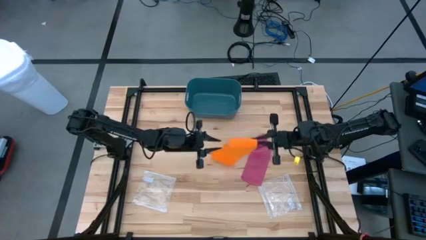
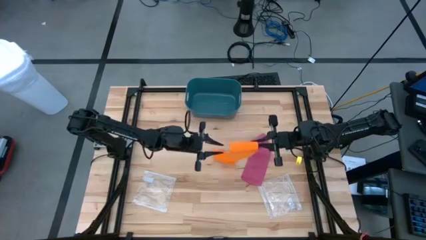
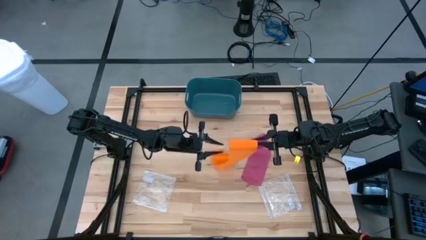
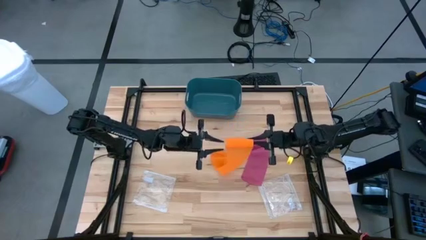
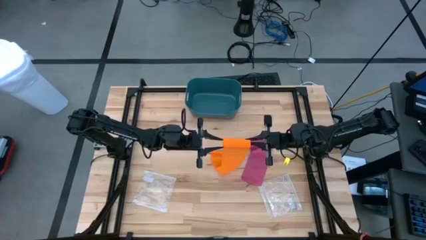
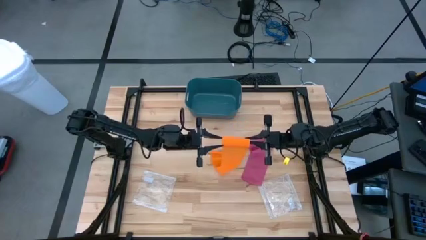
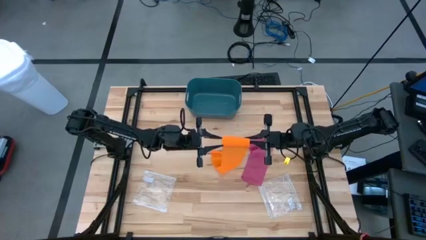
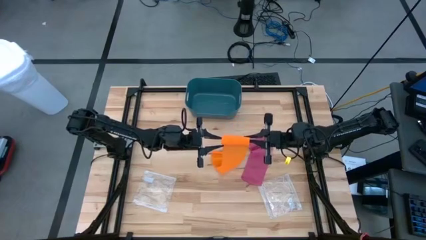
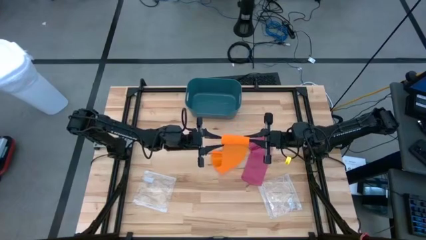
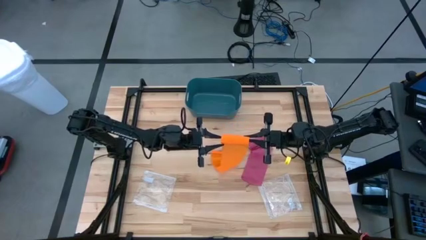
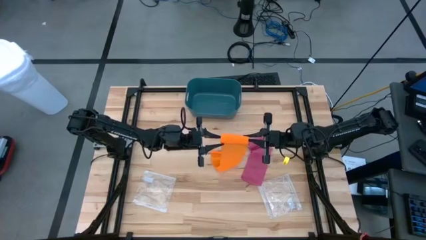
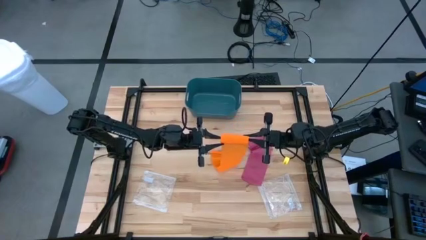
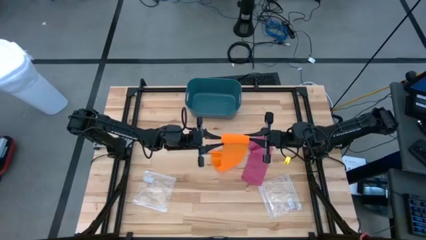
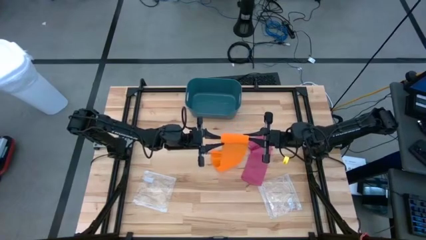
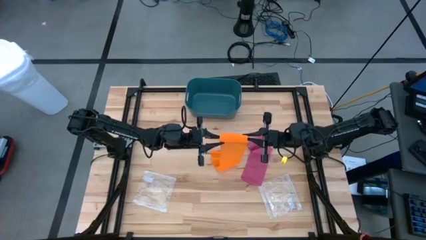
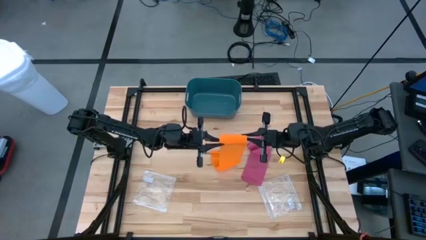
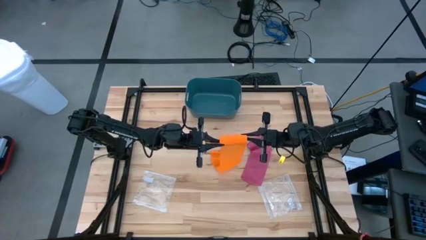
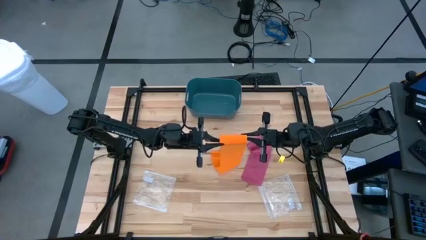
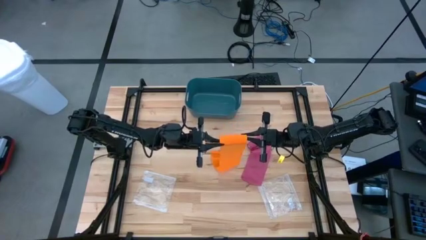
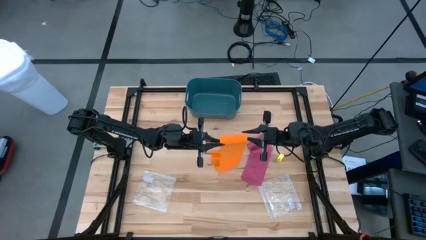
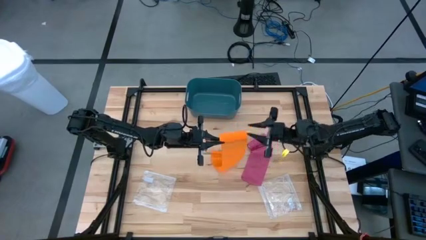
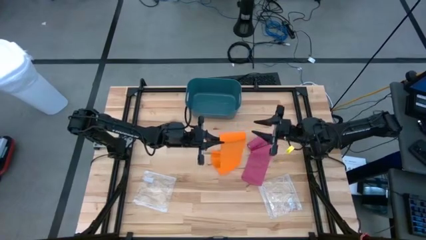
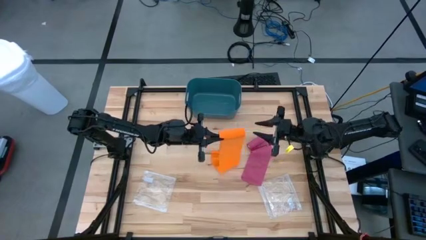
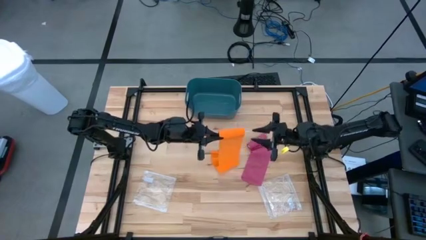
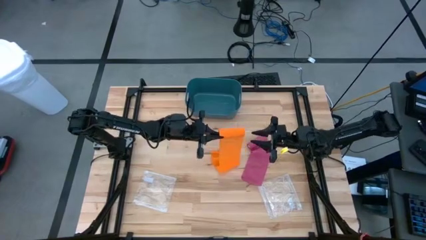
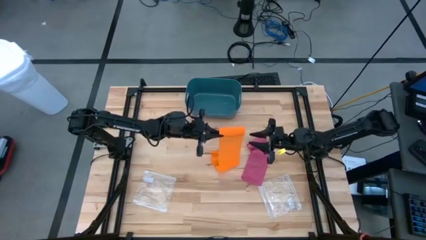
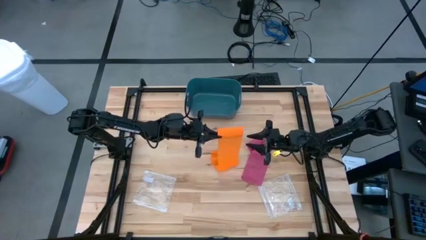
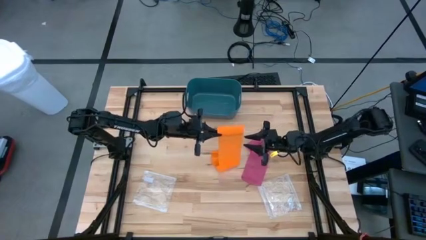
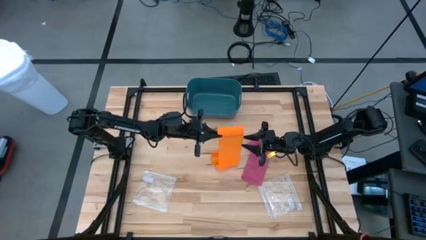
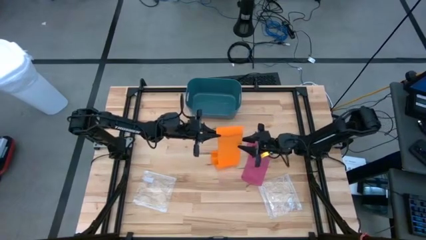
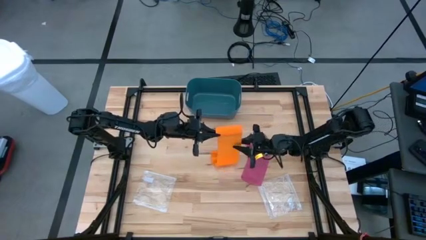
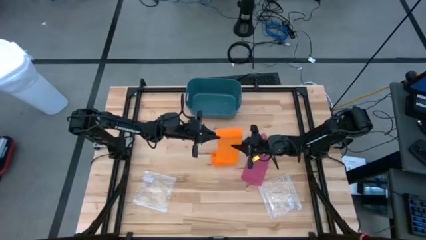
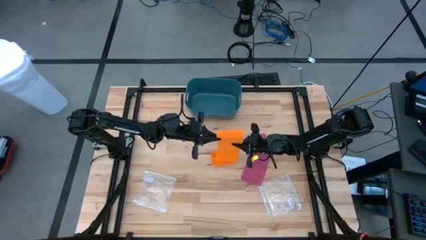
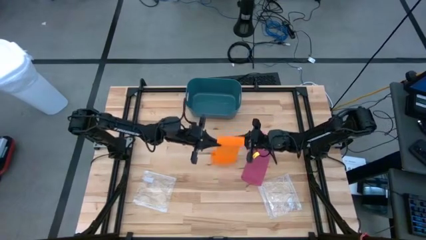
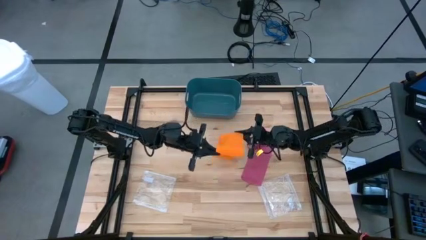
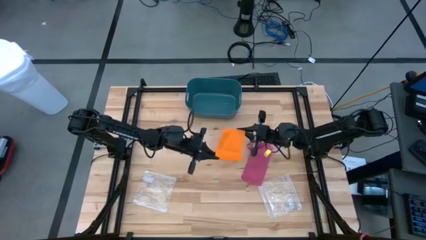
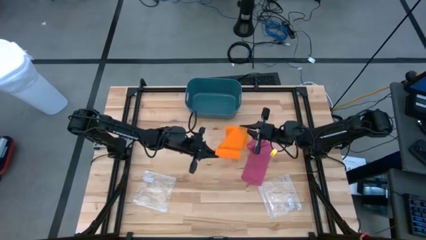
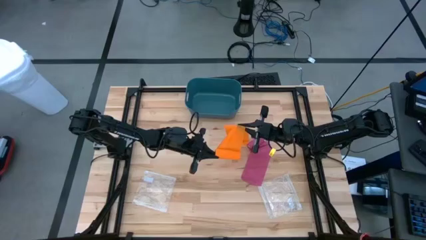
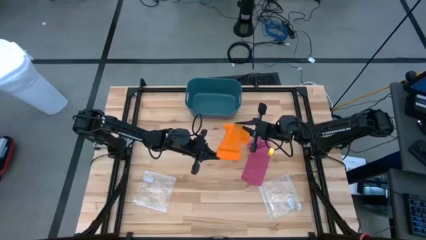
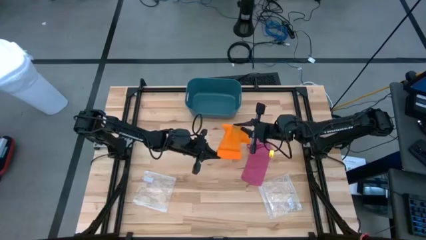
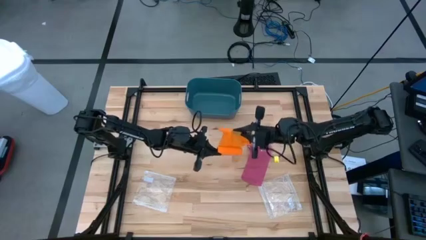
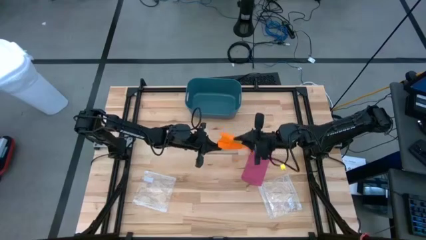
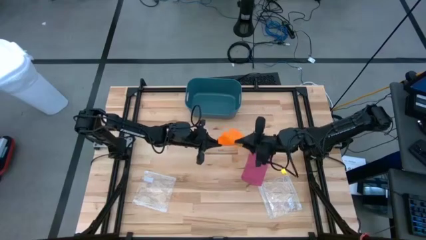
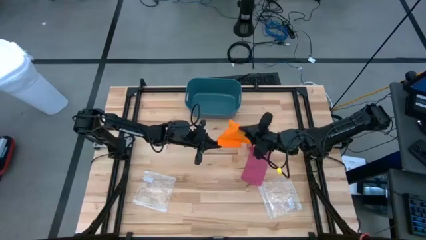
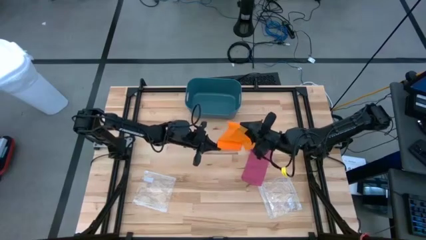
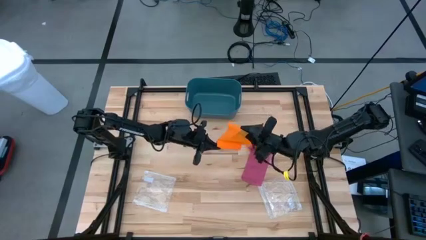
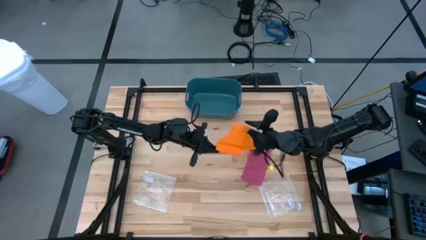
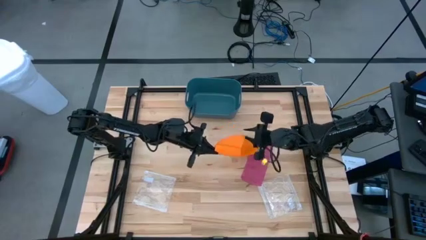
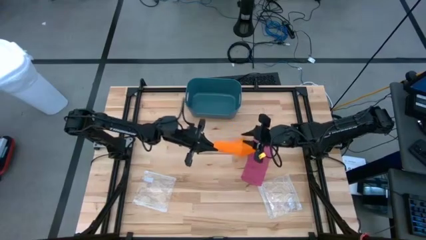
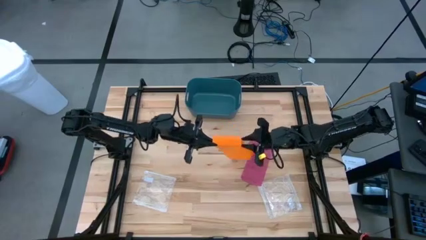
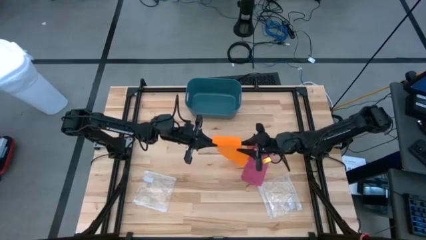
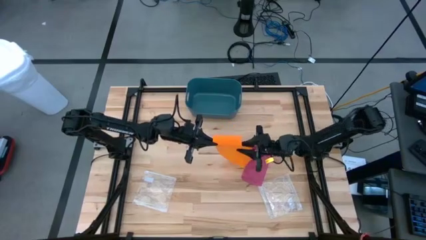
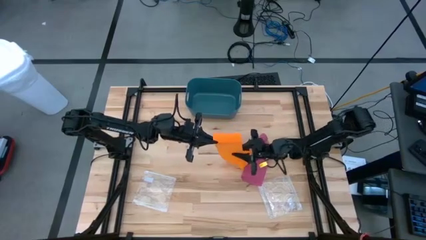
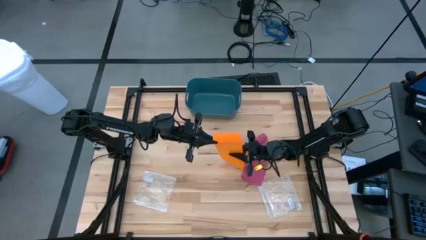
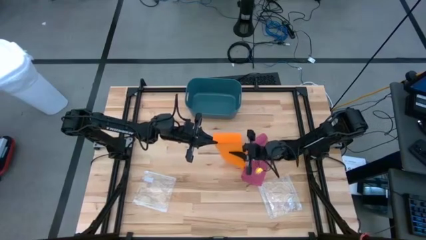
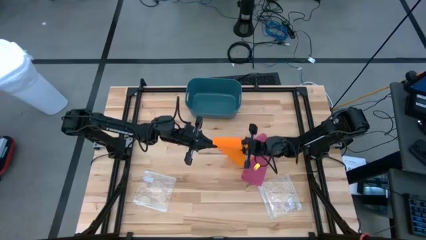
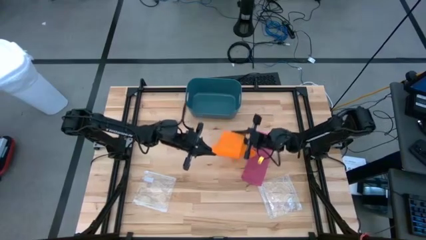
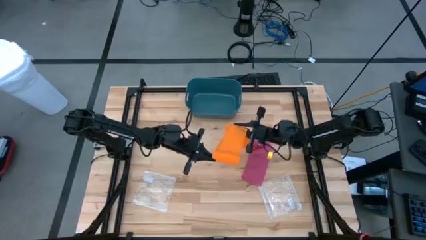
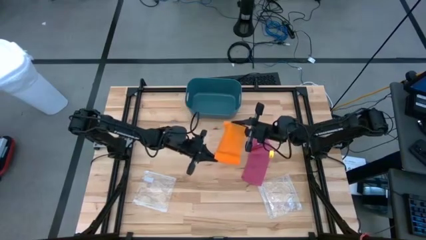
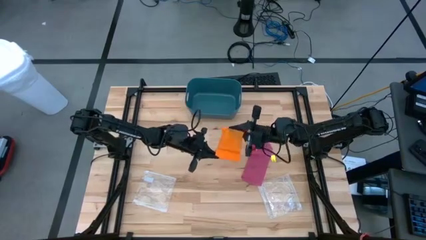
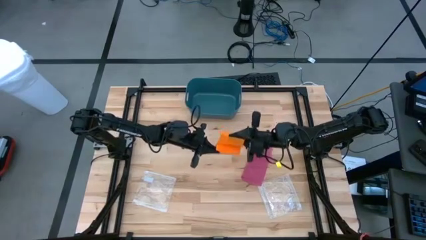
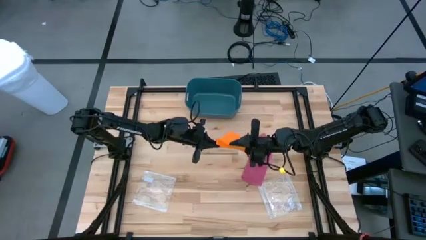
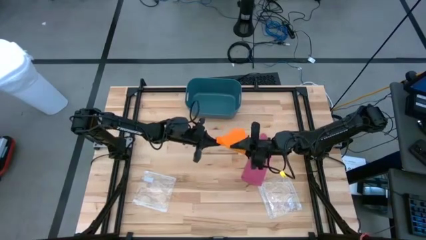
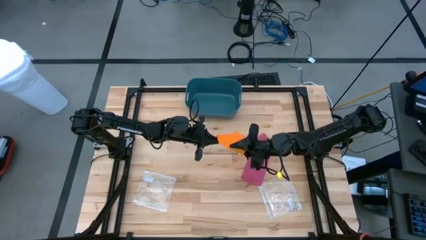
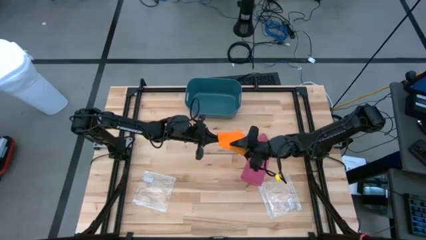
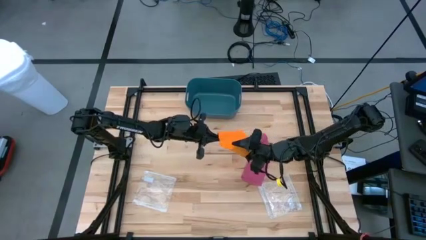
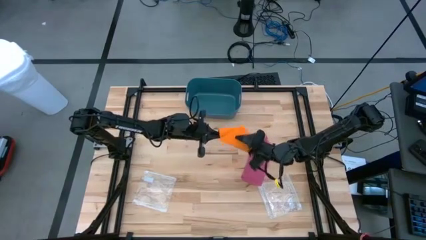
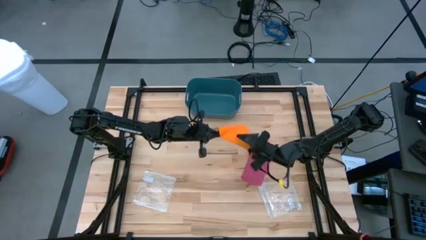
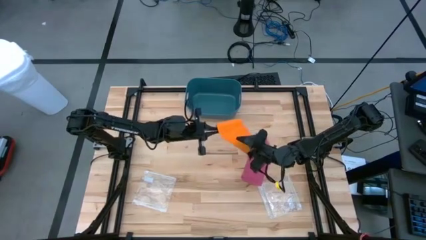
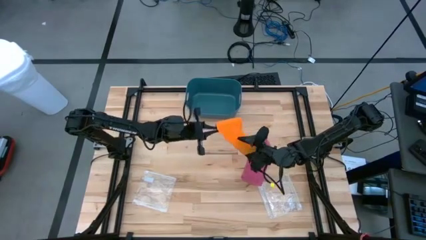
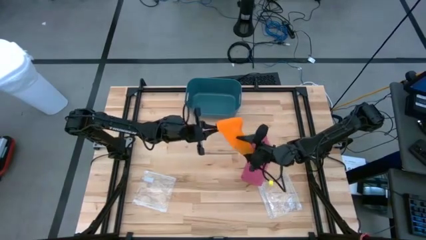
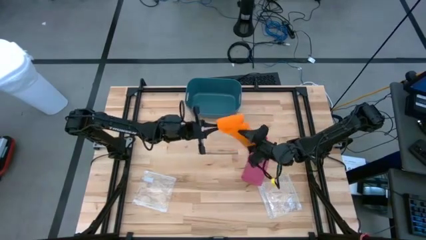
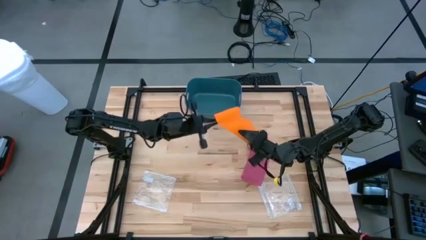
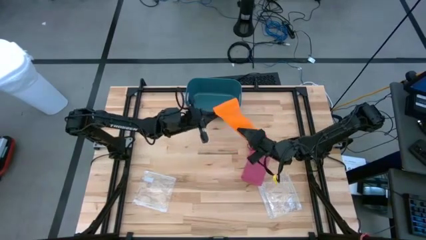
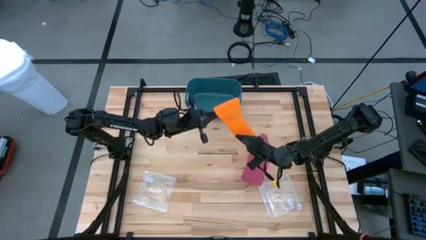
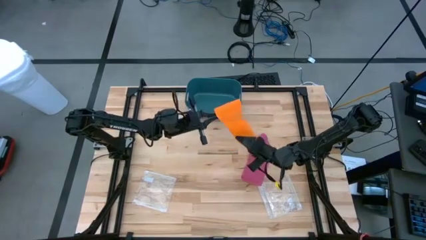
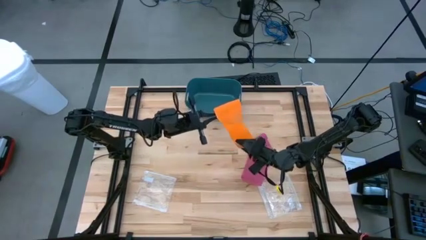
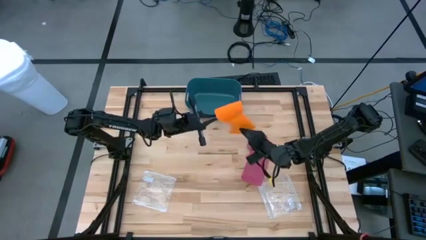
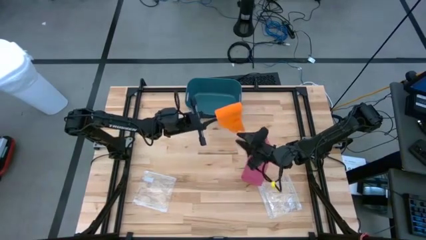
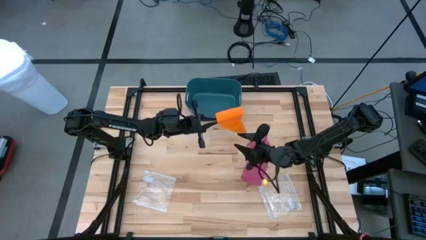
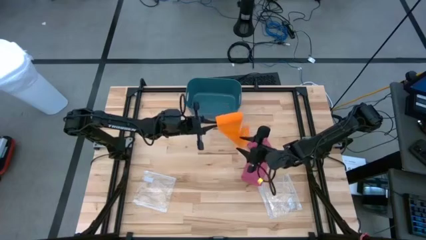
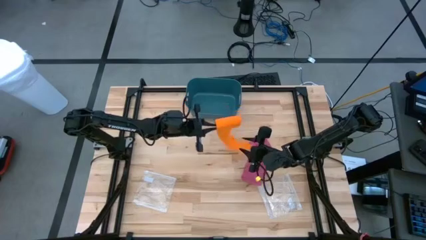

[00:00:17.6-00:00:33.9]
Task: Roll bandage
Roll the orange bandage
